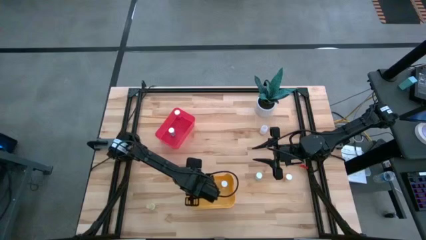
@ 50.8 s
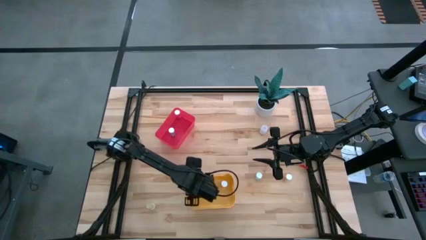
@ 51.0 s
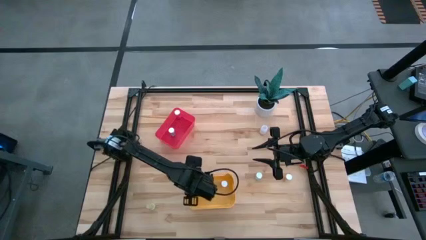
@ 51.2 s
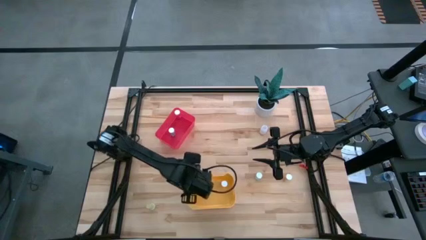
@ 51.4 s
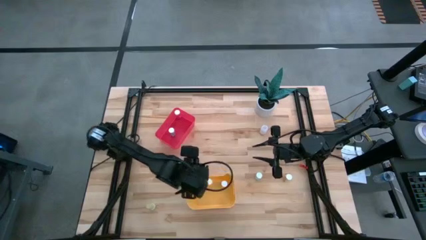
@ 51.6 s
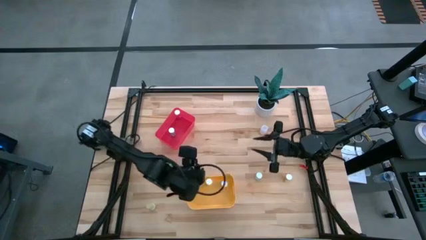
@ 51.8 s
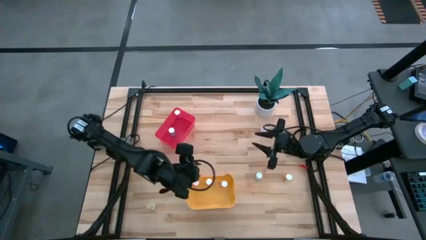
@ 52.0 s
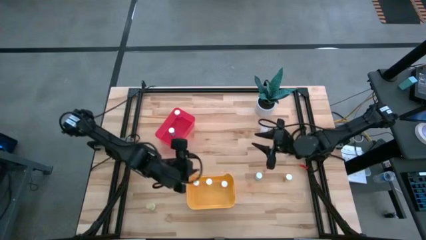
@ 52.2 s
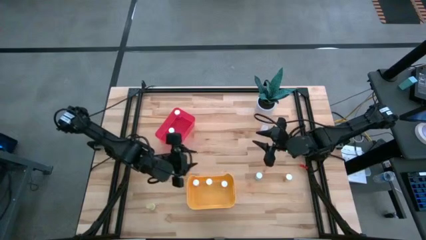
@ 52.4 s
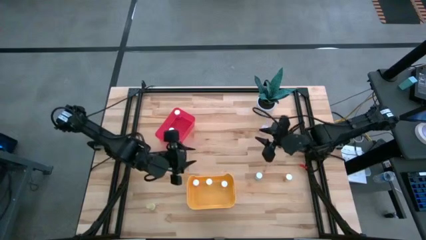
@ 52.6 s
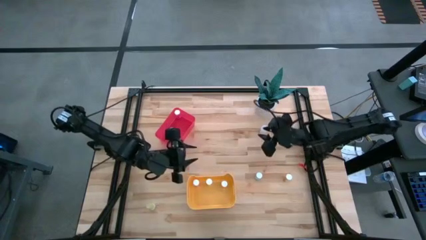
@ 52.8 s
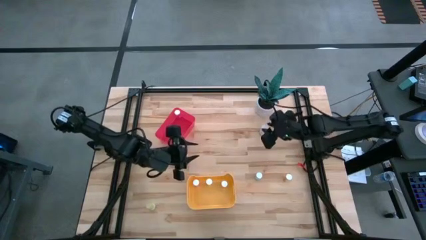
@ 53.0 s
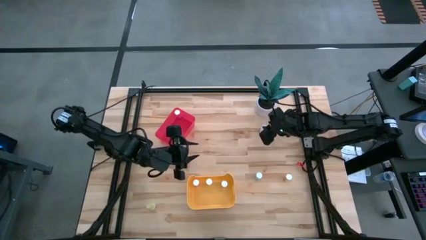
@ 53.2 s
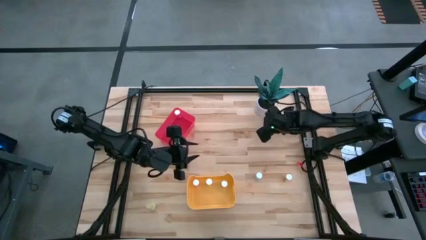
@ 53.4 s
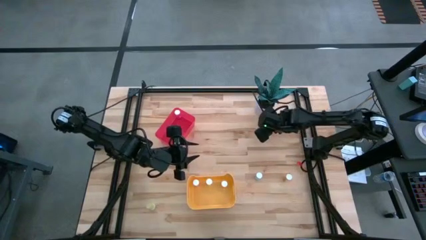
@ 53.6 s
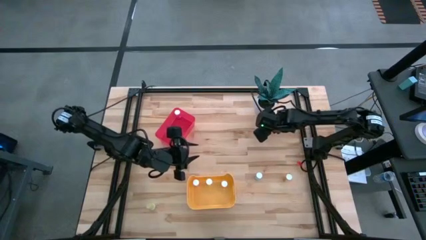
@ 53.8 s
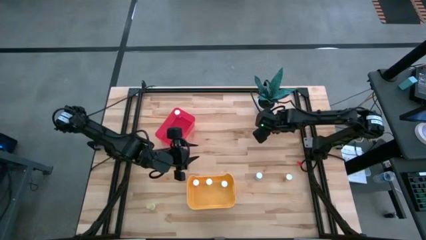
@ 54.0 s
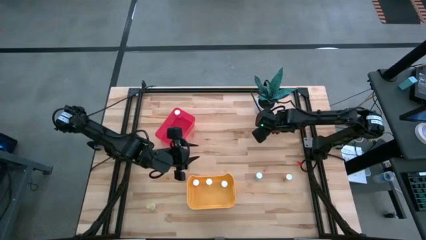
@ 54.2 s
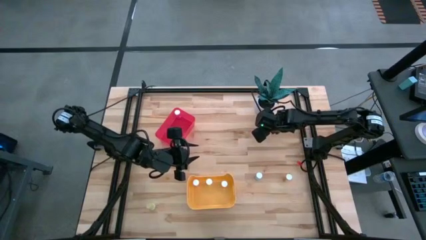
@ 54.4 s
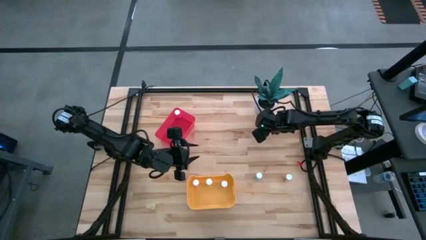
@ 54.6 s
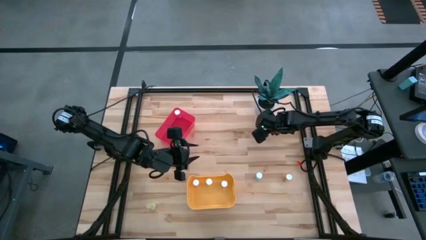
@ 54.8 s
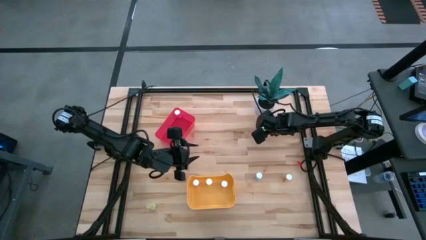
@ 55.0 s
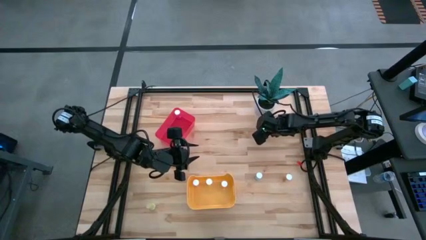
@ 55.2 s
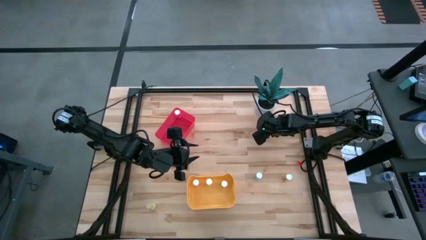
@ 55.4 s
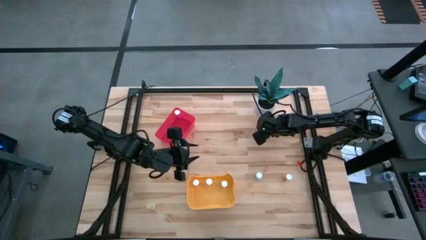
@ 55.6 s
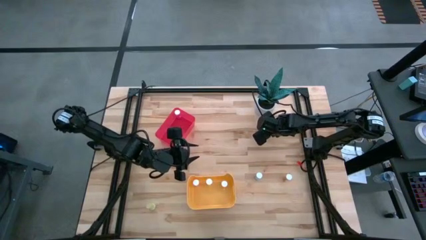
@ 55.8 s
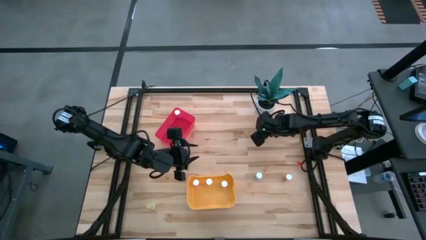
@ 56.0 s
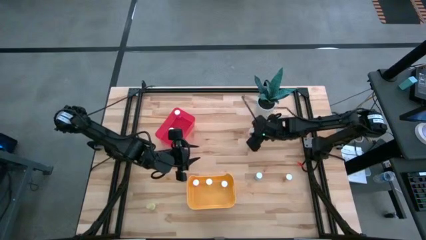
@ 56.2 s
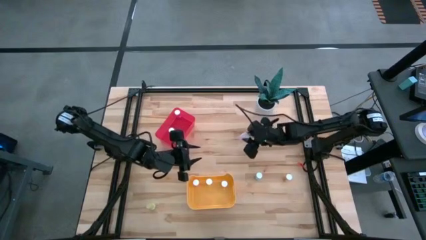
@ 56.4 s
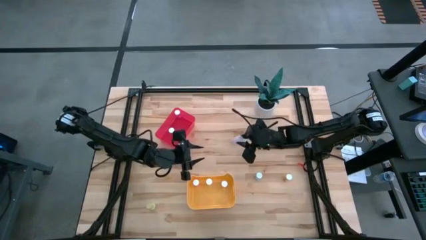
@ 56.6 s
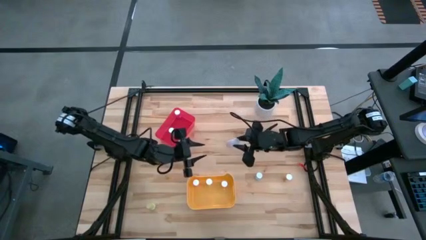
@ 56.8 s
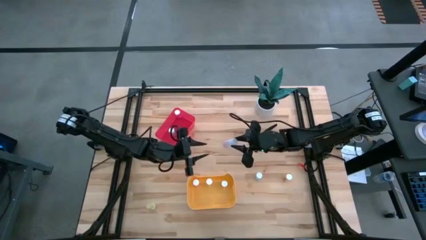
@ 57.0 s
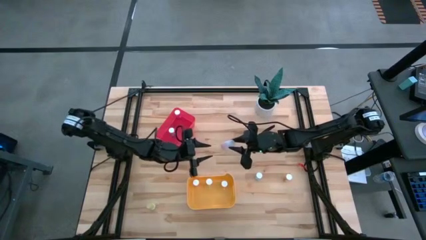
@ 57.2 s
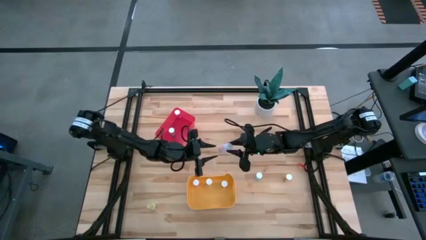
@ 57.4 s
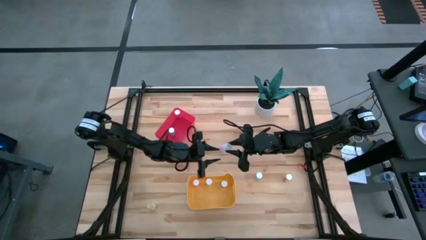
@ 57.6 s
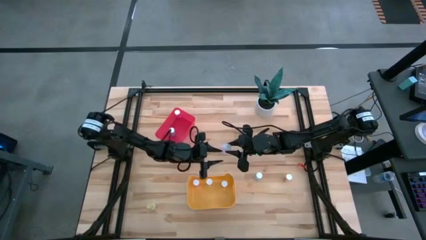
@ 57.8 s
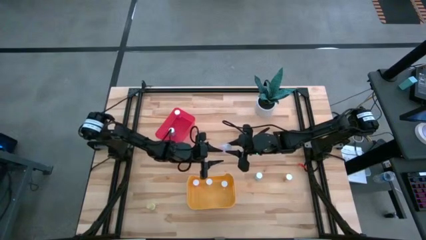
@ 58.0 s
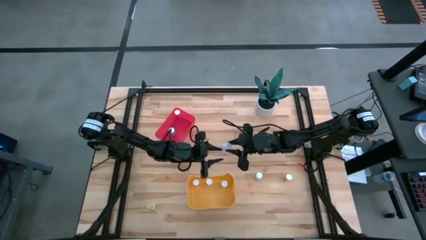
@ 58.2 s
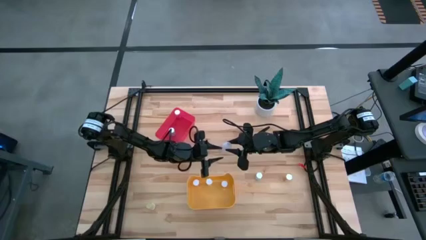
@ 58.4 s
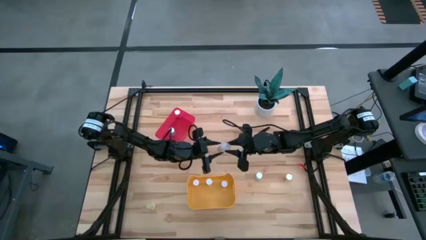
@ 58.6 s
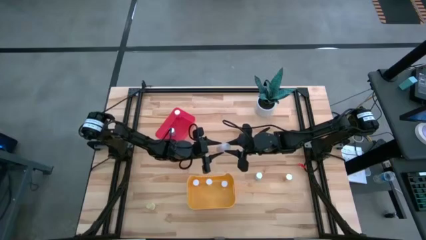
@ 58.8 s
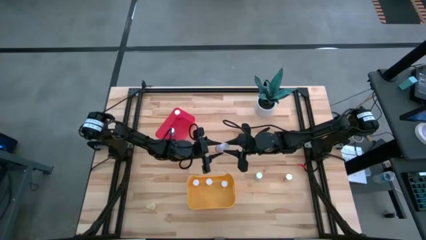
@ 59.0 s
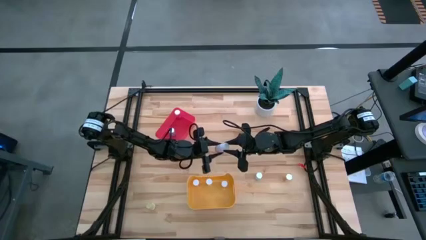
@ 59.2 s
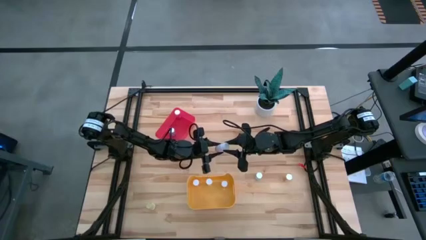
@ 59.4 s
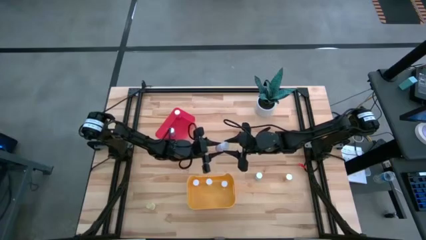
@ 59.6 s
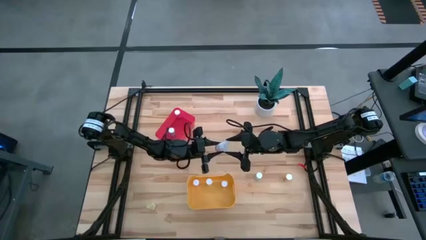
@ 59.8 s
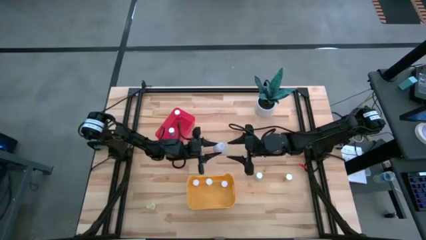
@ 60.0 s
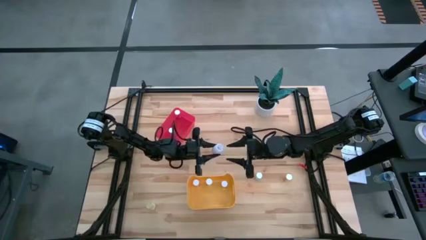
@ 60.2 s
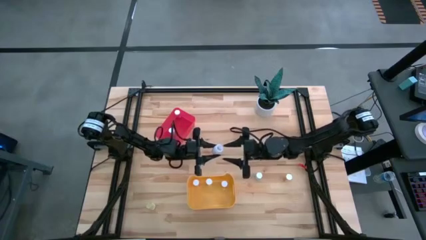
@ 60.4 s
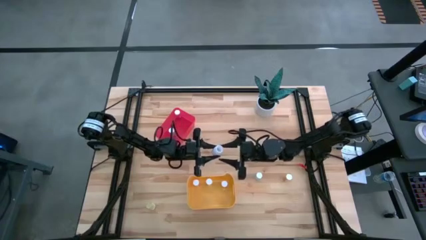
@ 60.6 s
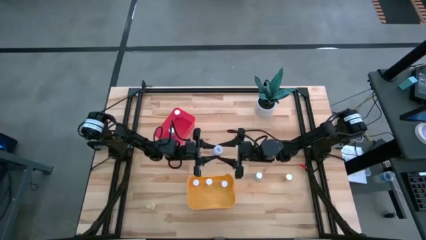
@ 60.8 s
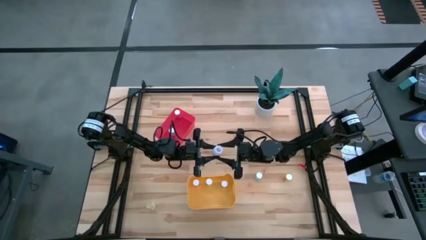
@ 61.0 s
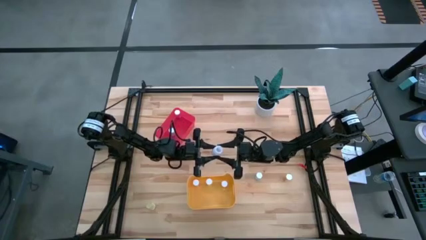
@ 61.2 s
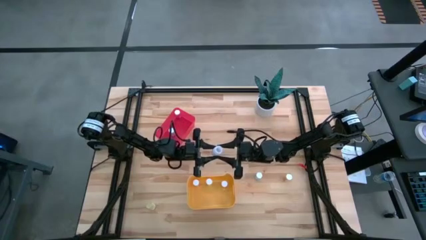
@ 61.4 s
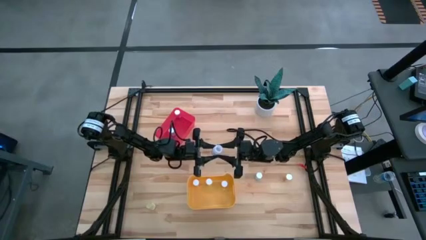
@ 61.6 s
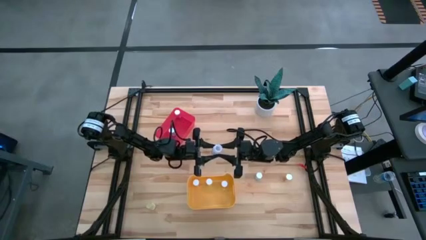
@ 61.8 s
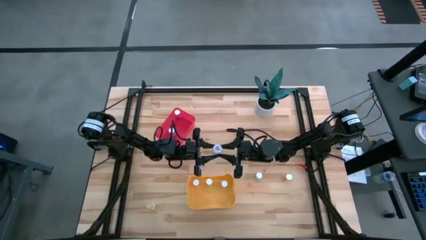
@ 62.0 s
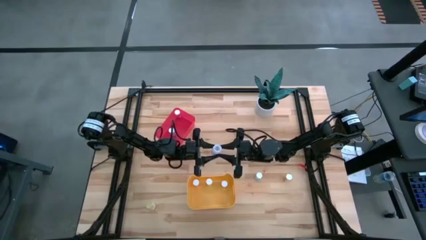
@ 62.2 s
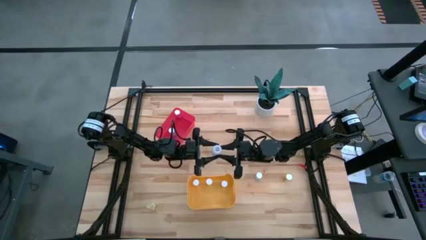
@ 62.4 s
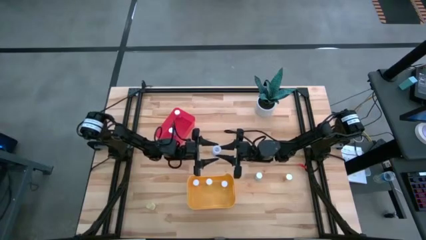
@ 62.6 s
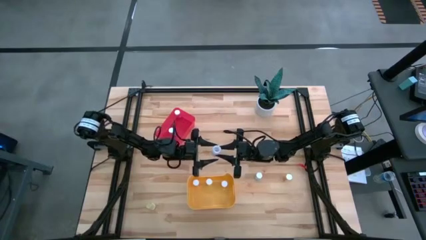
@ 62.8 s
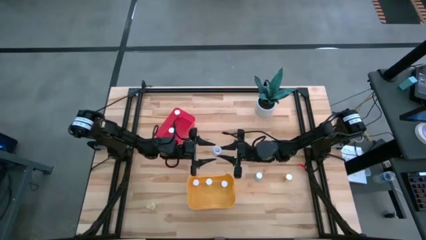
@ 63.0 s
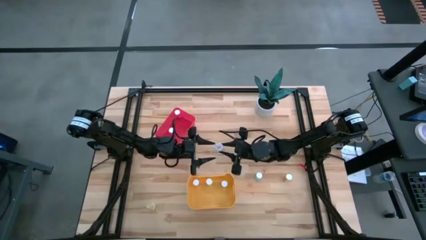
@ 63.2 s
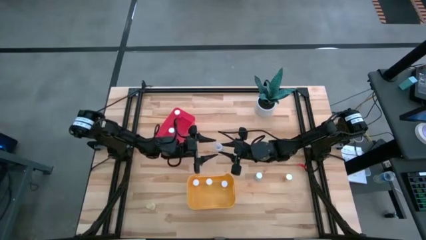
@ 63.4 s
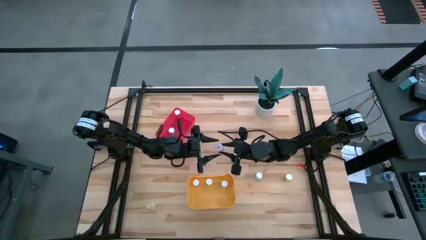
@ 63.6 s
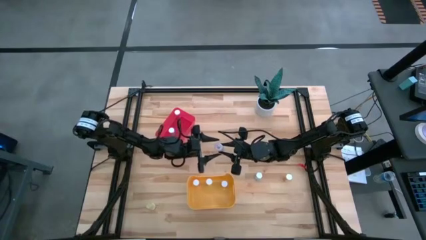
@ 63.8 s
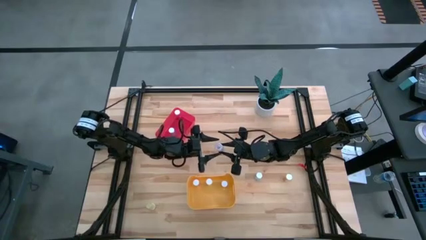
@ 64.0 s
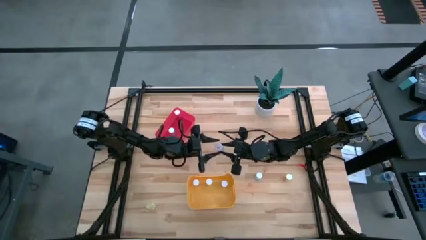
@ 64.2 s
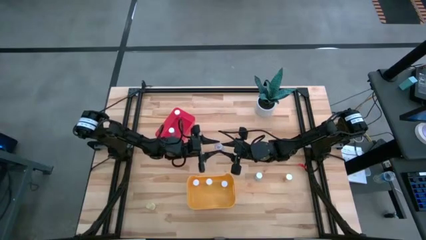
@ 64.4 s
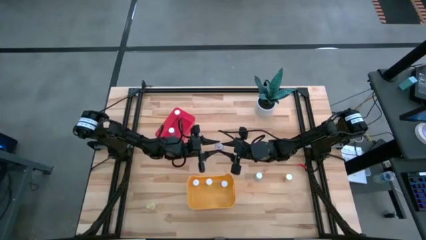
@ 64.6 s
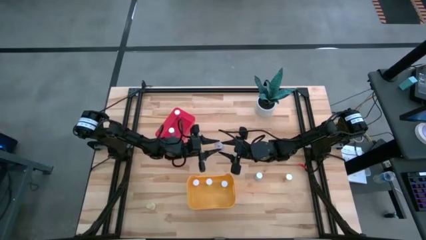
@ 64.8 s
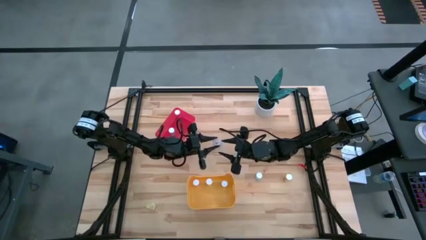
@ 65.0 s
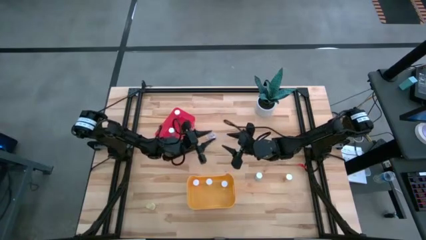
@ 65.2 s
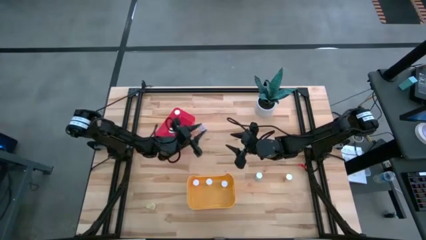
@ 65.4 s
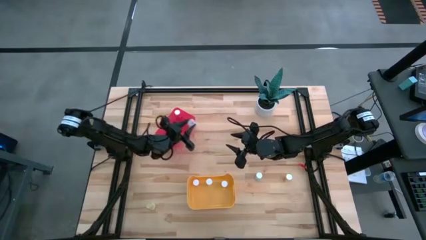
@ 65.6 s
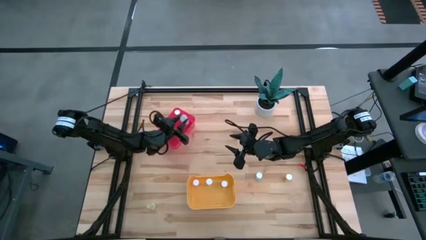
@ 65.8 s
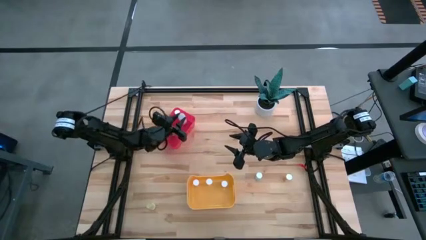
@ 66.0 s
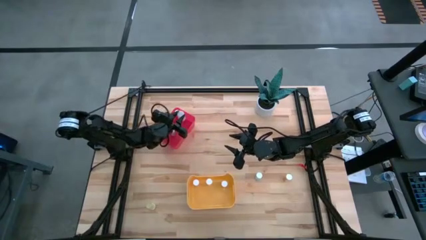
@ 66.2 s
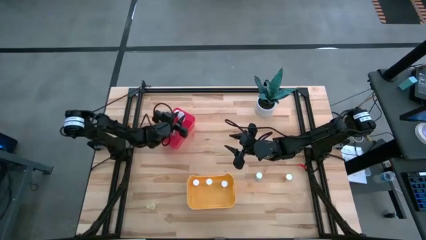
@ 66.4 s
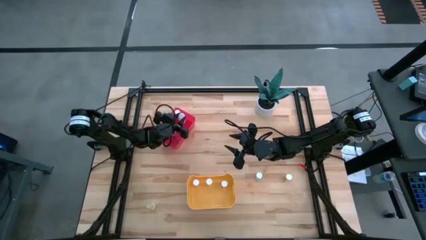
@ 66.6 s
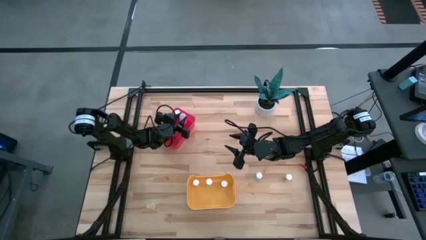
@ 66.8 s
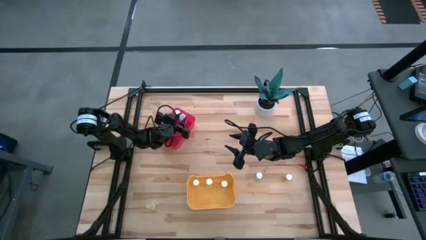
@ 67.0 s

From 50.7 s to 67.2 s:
Task: Pick and place medicine bottles into bin by pill shape (circle, oval)
Put the white capsule bottle into the red bin
